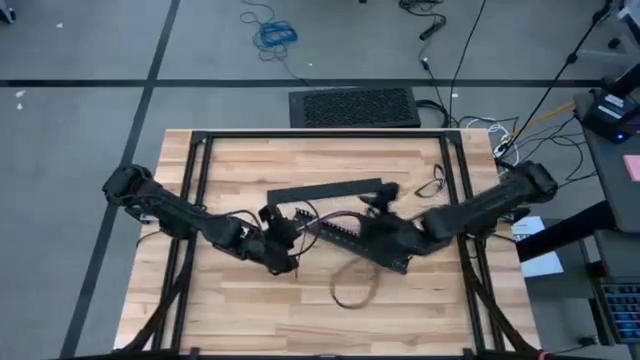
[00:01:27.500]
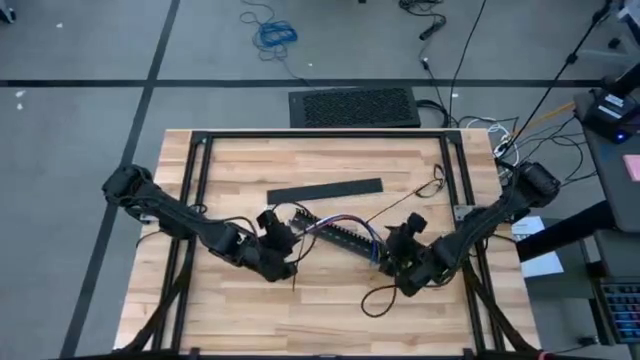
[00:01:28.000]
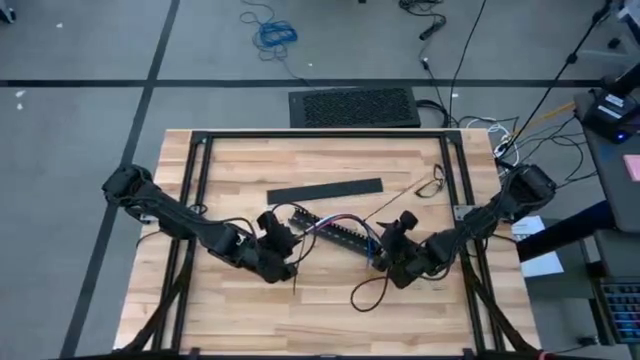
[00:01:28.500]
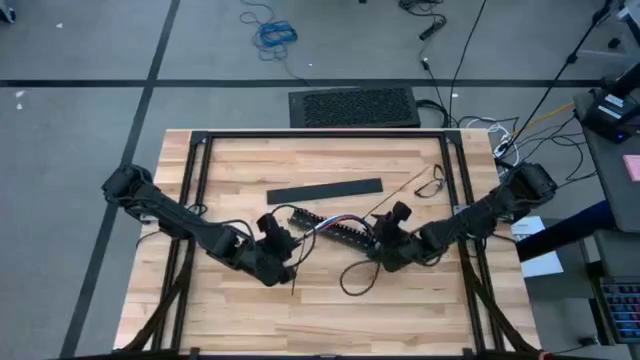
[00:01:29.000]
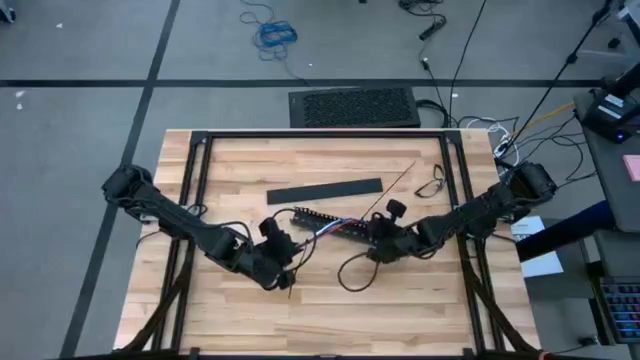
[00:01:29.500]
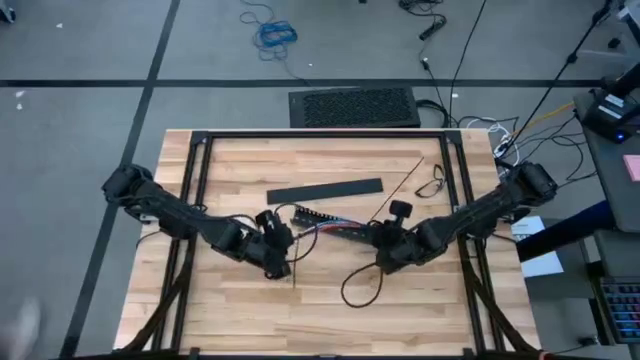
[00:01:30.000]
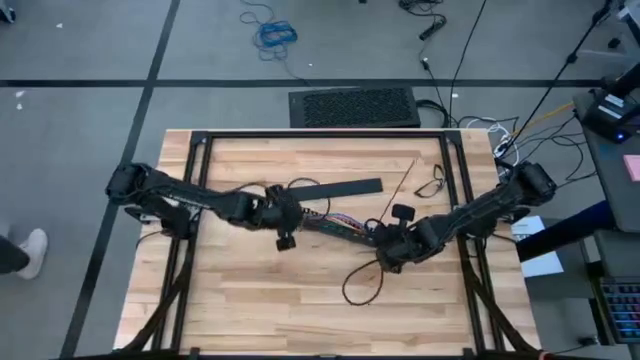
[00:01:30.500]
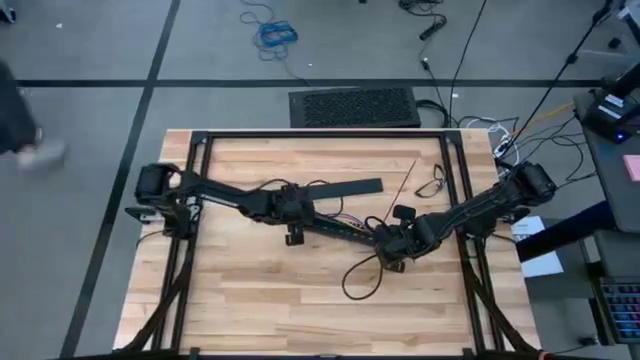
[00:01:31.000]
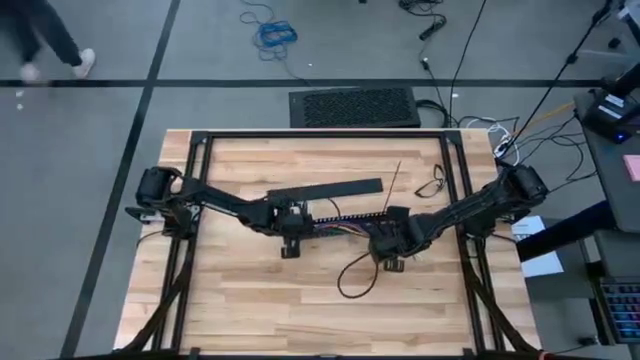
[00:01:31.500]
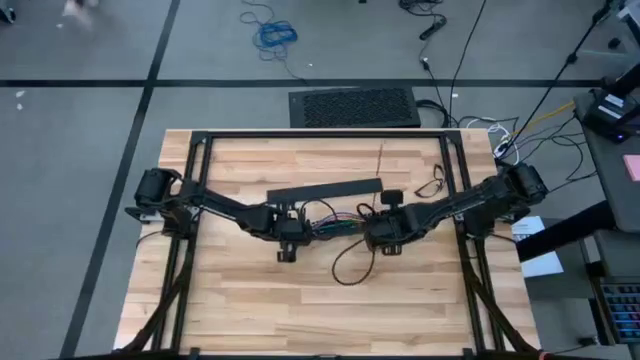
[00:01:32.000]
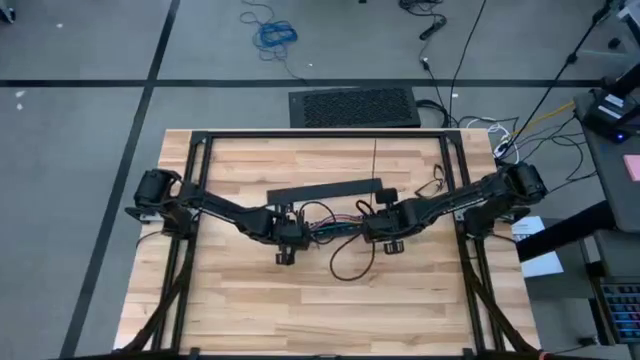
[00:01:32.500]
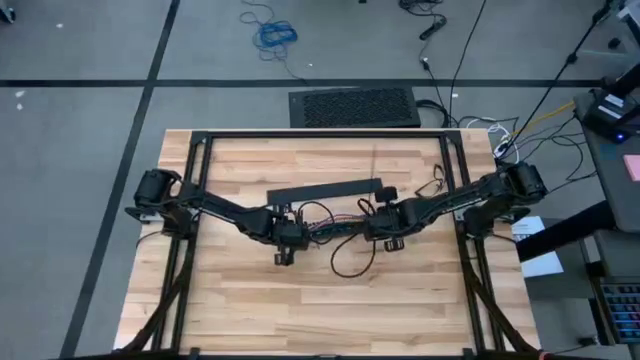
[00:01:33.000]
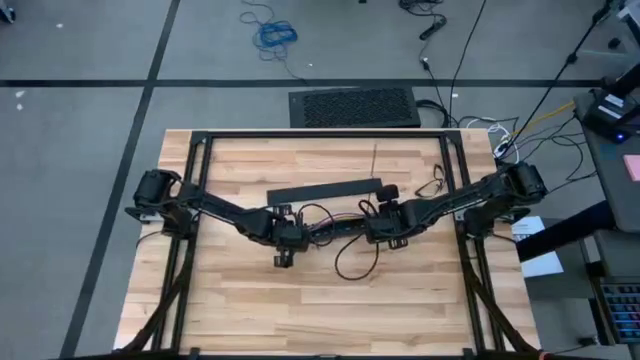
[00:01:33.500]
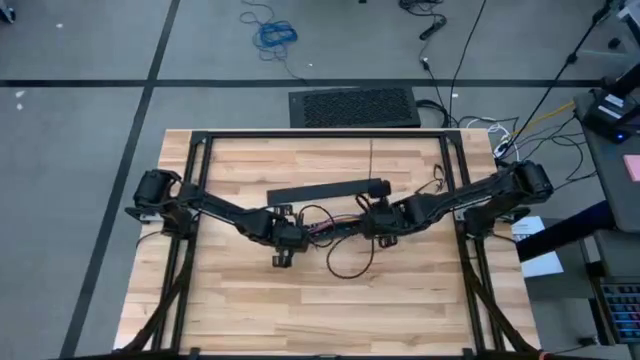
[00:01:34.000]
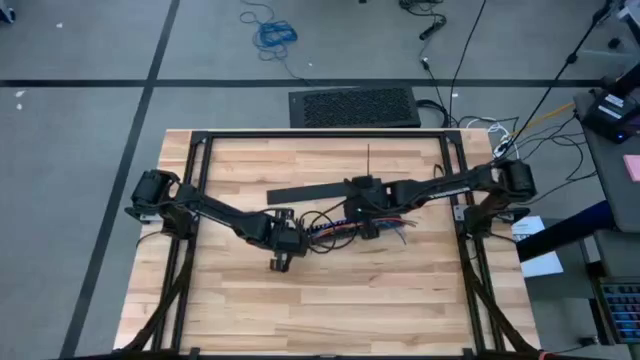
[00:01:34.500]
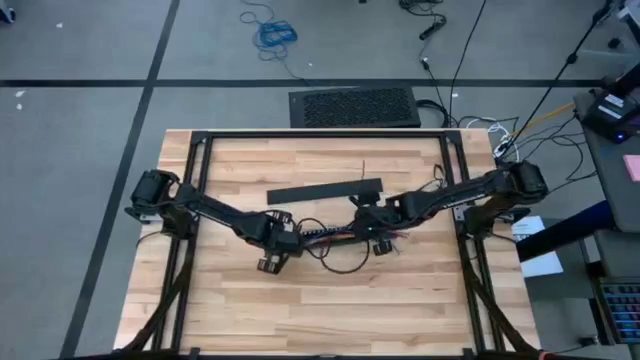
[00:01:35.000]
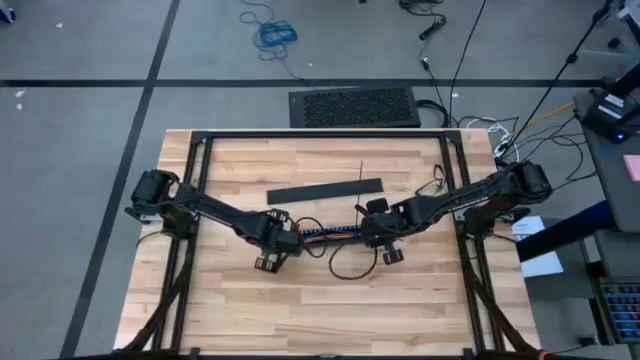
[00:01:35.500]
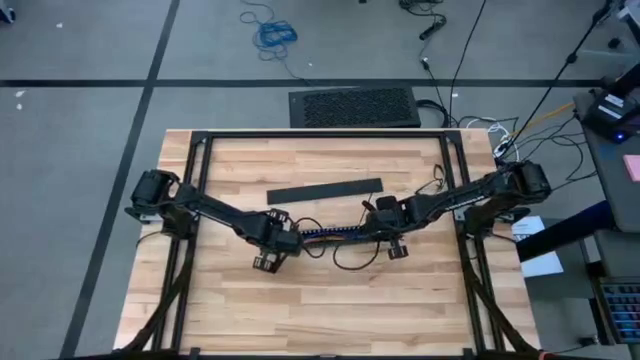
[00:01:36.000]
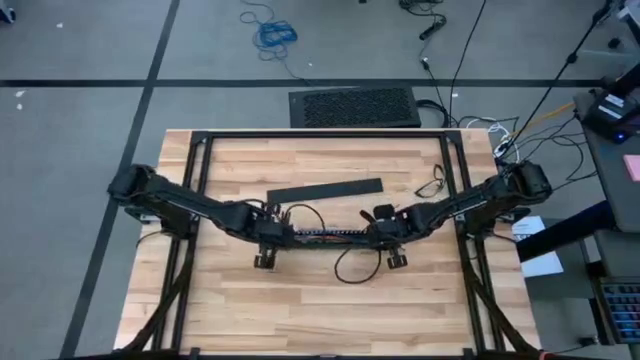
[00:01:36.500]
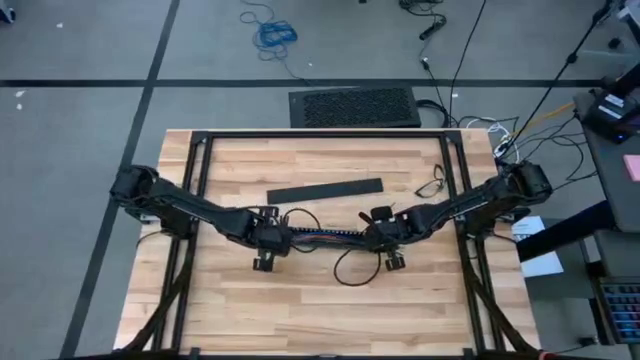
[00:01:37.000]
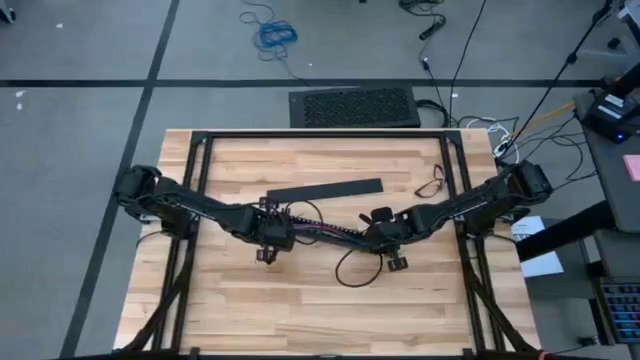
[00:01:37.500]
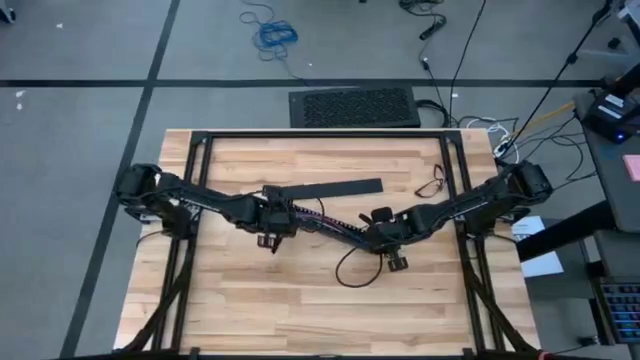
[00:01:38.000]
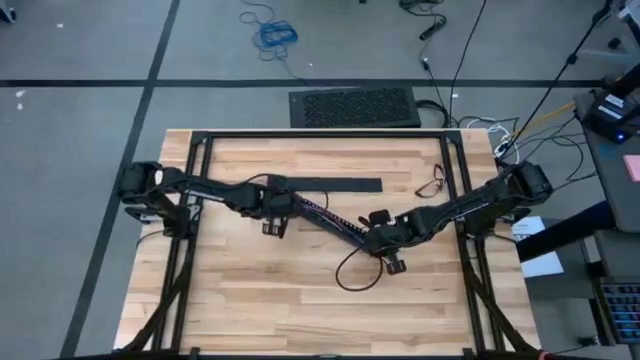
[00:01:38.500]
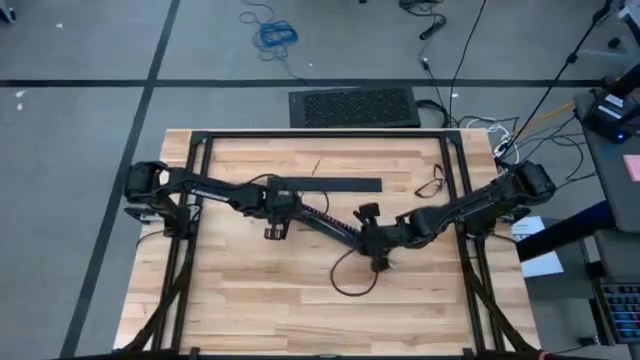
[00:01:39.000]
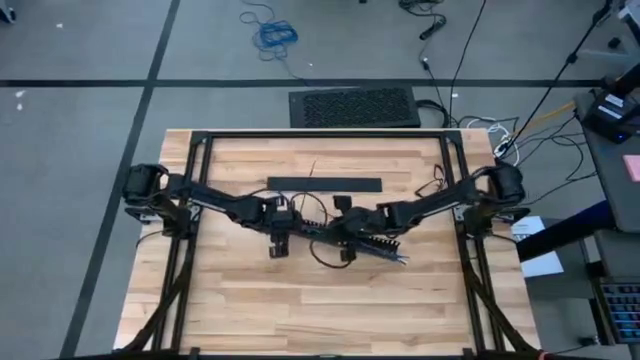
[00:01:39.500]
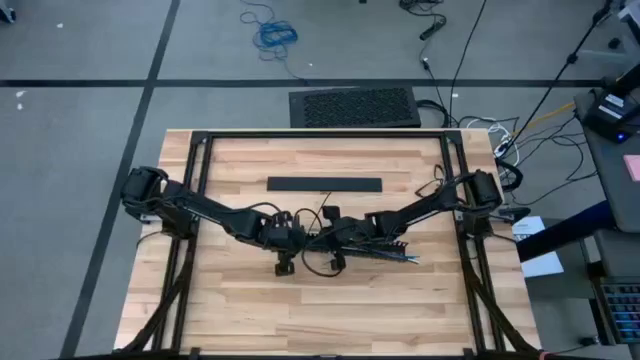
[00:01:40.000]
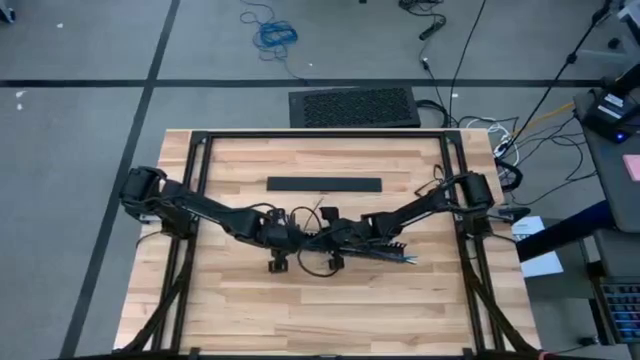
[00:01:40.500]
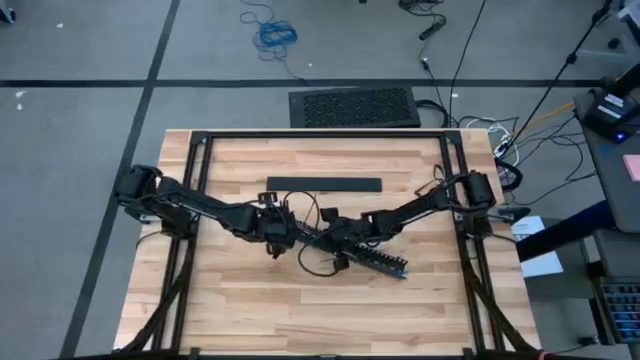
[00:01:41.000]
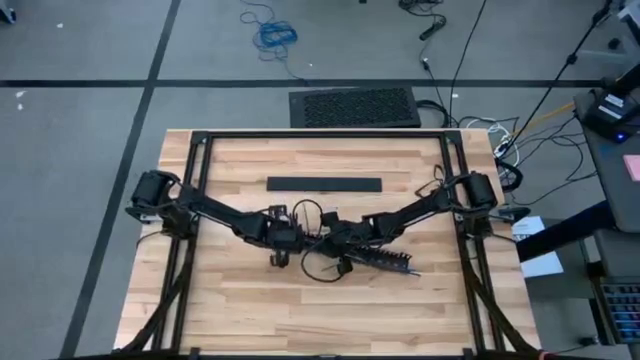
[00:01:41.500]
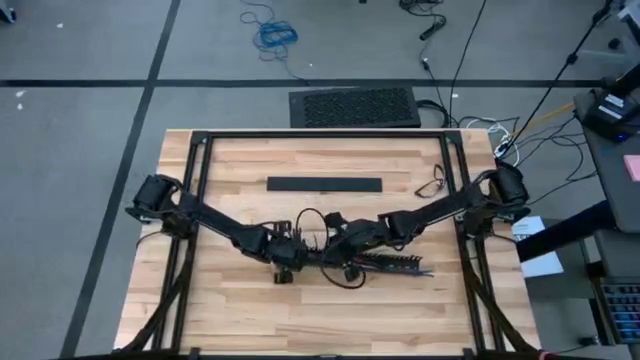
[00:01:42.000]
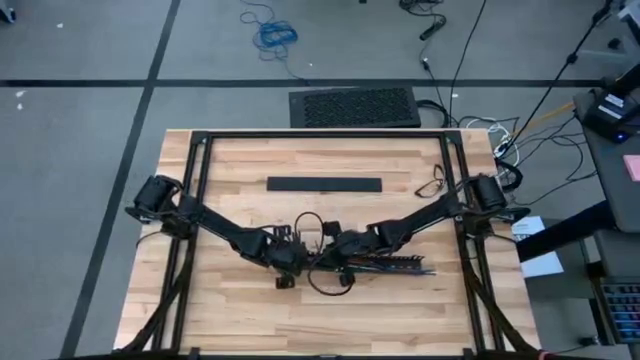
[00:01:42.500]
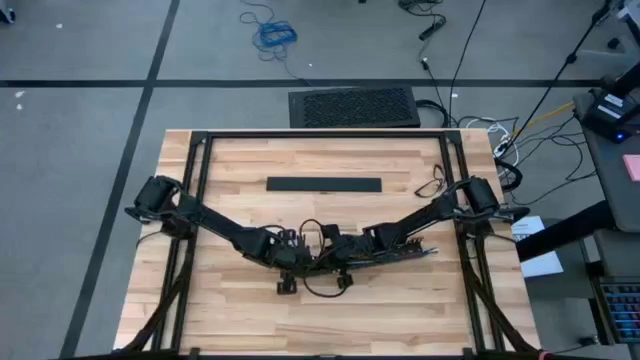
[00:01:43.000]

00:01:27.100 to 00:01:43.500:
Task: Ziptie cables
Put the zip tied cables into the black cable duct

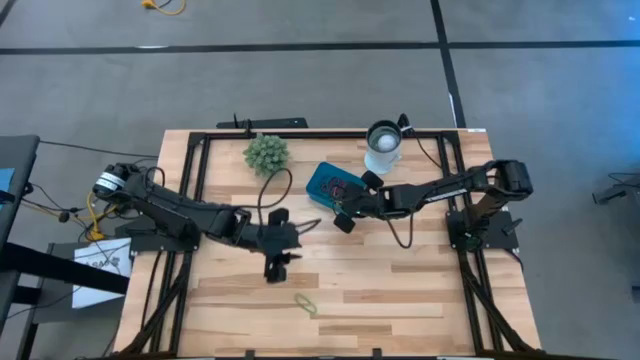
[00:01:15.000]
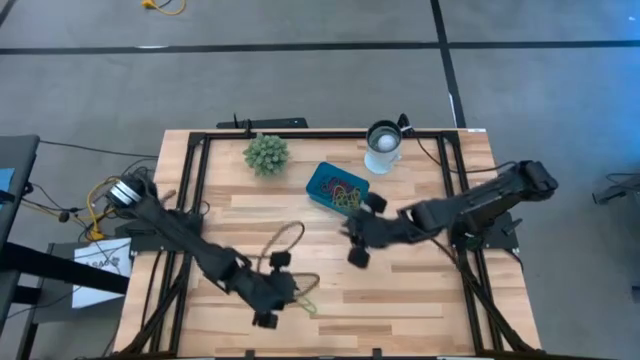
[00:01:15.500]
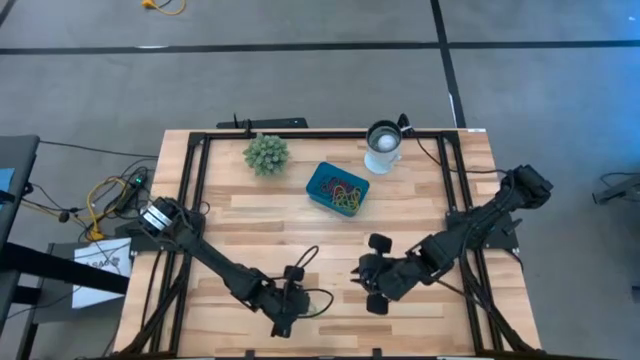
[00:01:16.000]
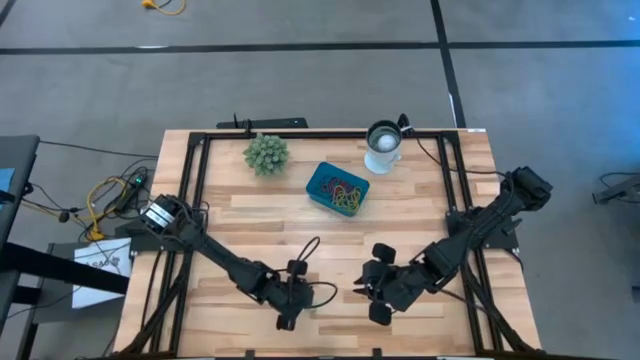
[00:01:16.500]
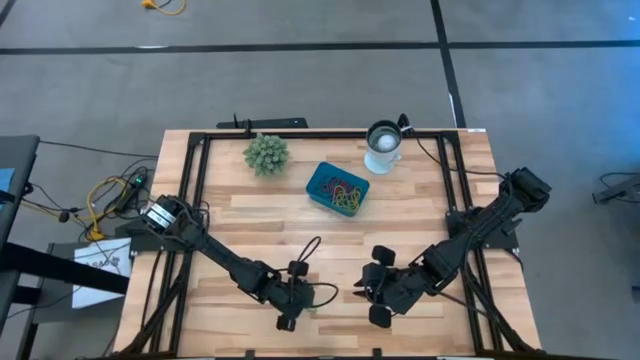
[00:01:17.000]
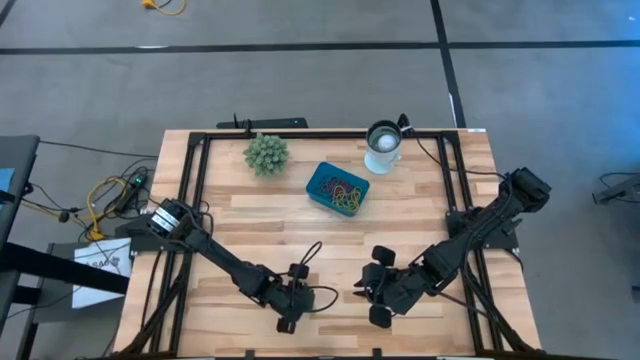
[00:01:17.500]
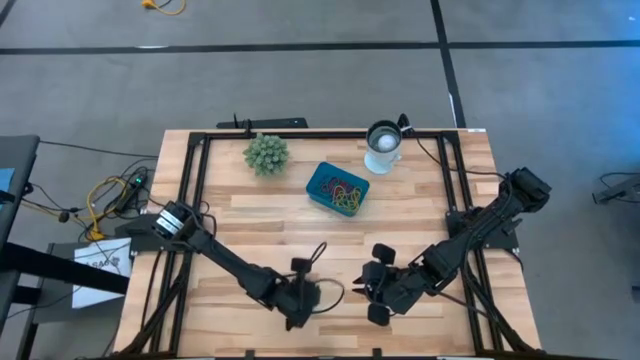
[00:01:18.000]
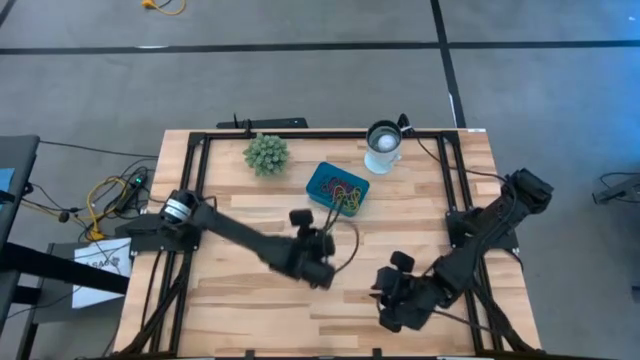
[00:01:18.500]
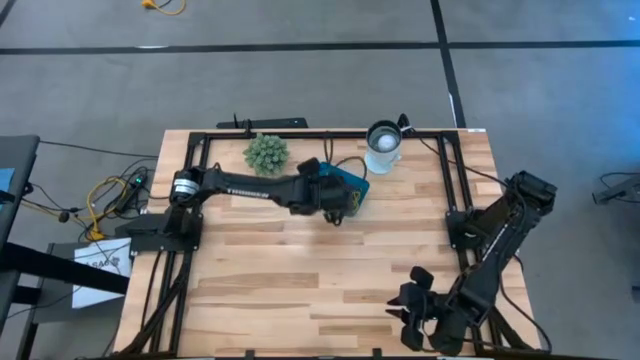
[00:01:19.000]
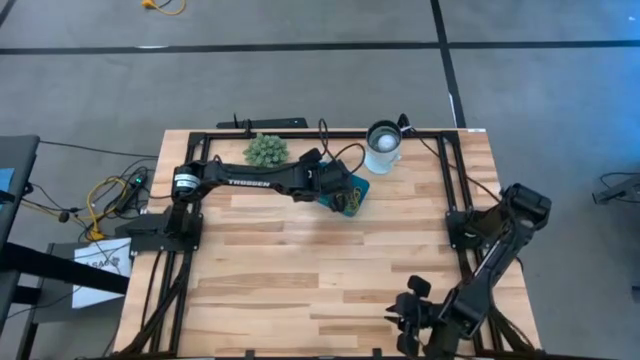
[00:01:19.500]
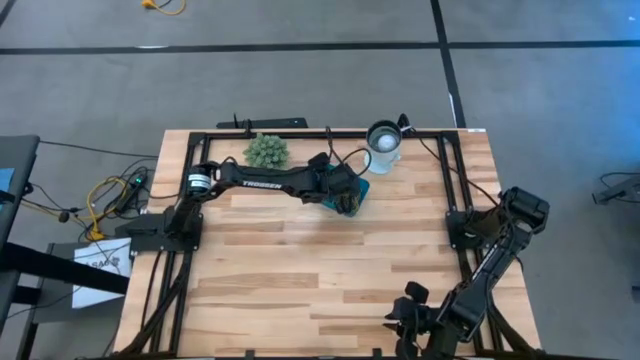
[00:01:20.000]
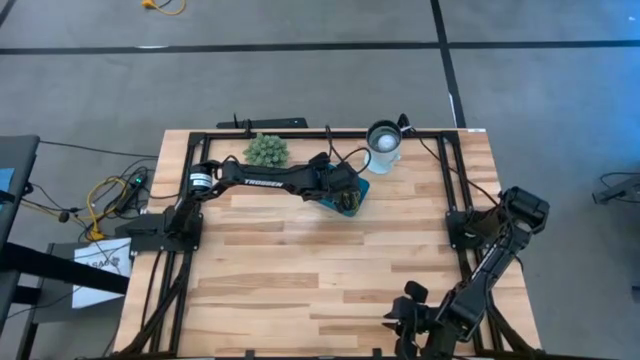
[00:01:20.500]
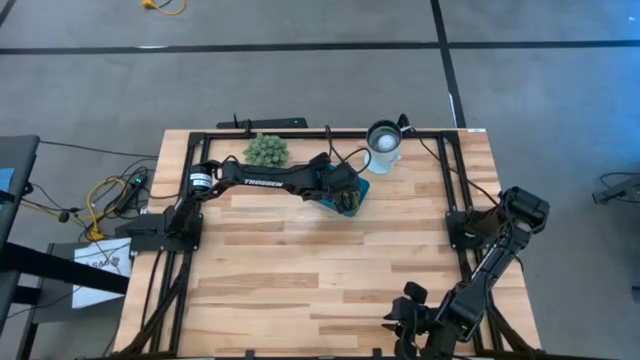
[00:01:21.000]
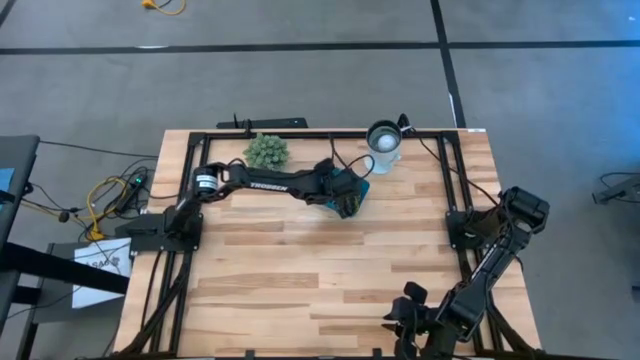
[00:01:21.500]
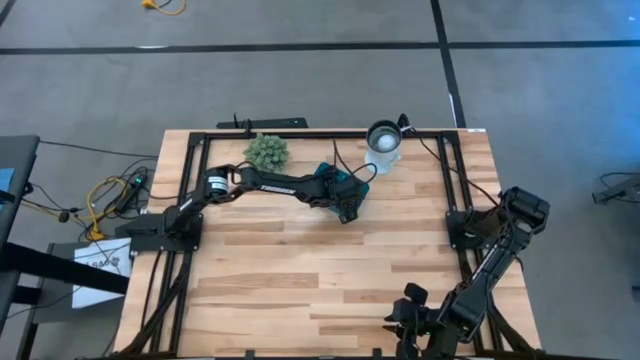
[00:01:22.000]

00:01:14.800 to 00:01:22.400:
Task: Pick and place items into bin
Put the green rubber band into the blue bin
